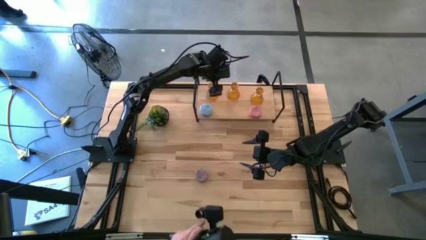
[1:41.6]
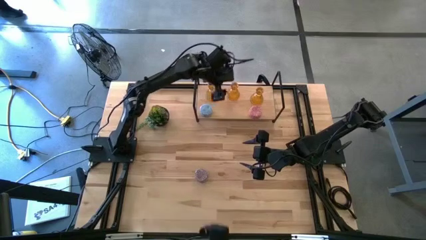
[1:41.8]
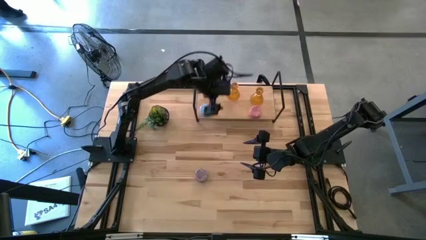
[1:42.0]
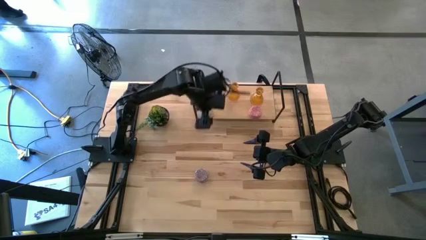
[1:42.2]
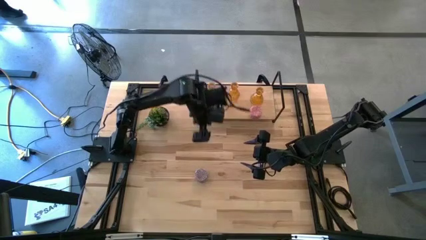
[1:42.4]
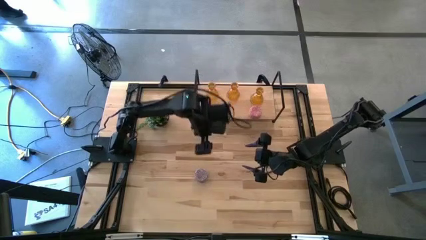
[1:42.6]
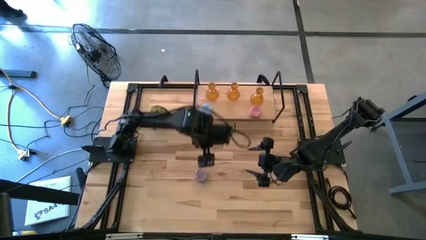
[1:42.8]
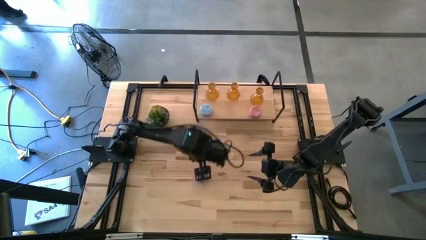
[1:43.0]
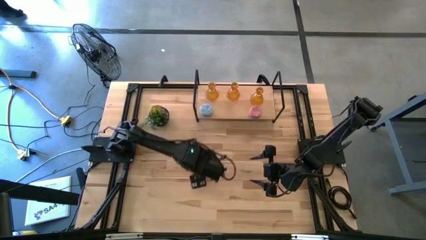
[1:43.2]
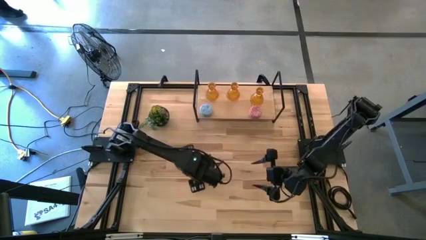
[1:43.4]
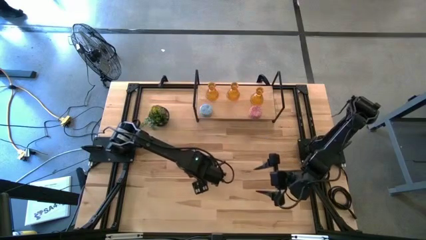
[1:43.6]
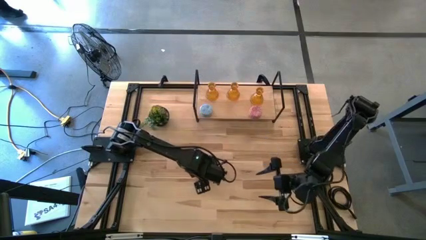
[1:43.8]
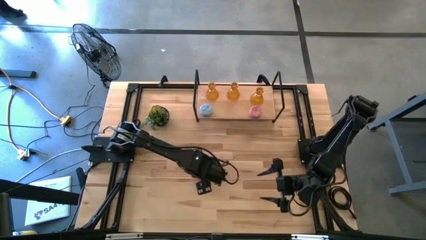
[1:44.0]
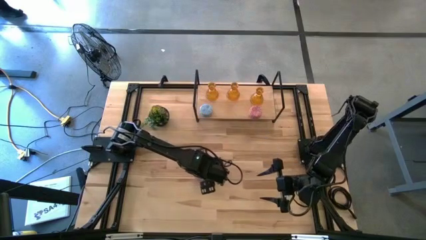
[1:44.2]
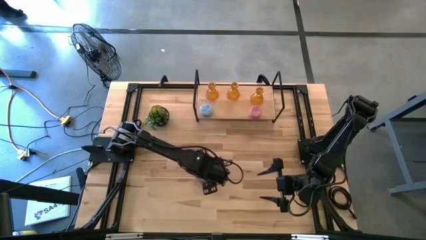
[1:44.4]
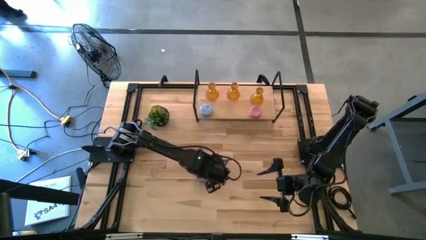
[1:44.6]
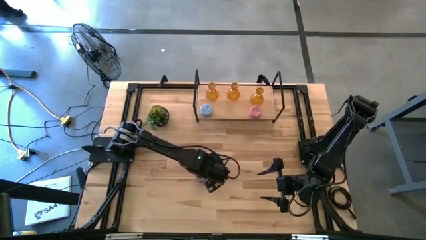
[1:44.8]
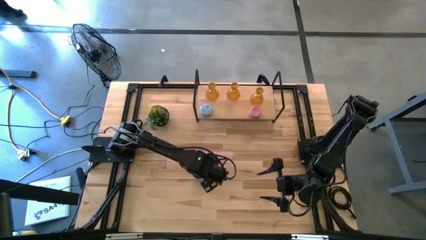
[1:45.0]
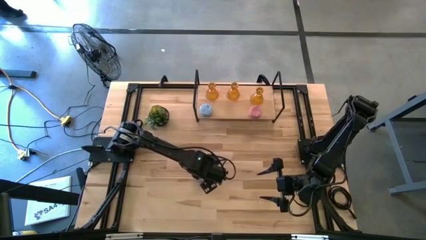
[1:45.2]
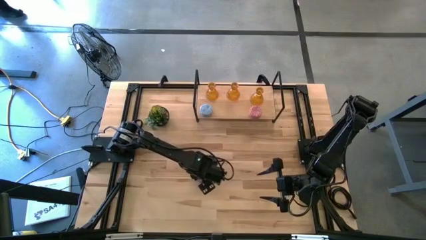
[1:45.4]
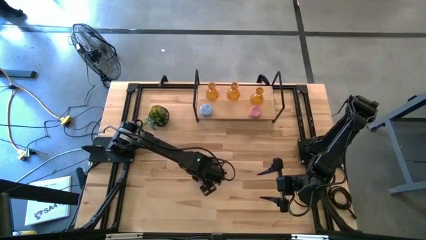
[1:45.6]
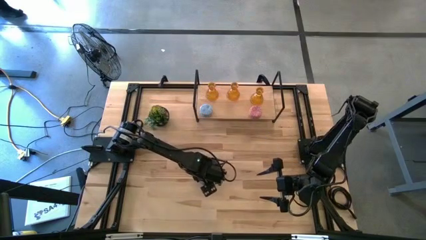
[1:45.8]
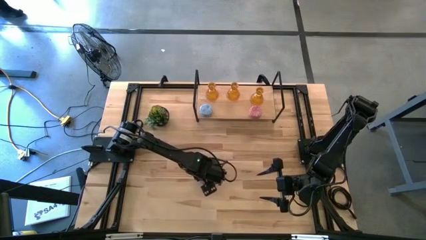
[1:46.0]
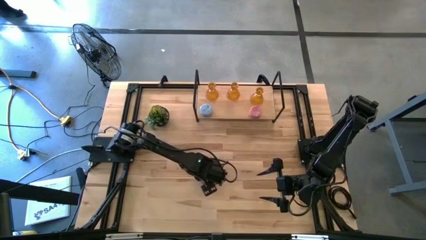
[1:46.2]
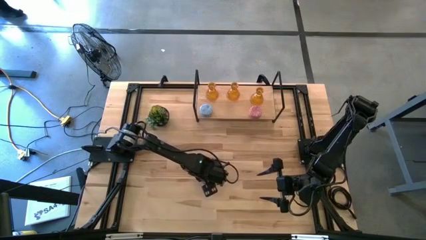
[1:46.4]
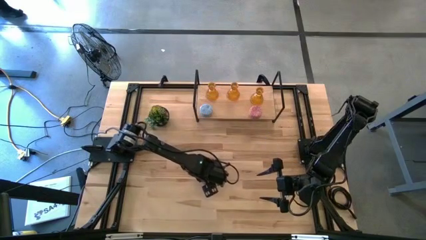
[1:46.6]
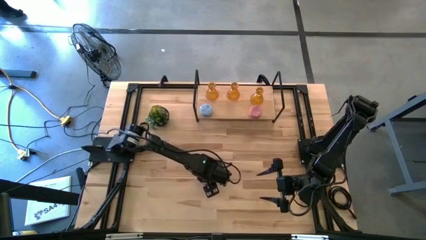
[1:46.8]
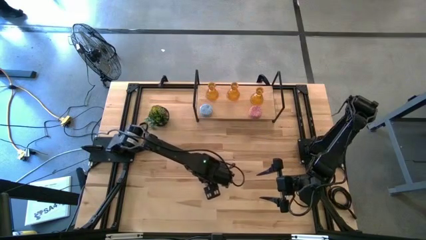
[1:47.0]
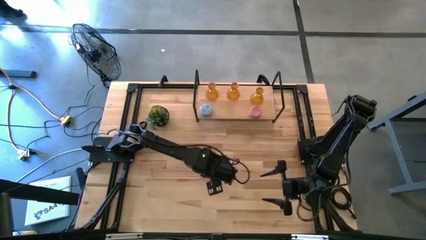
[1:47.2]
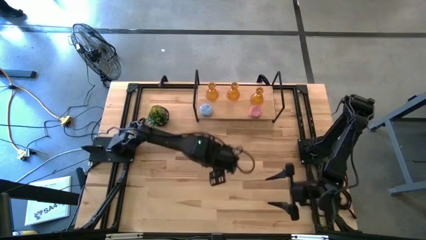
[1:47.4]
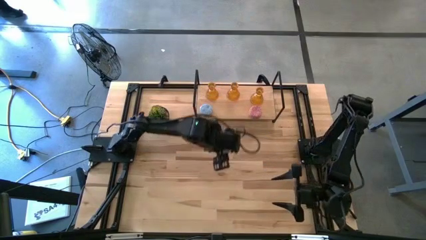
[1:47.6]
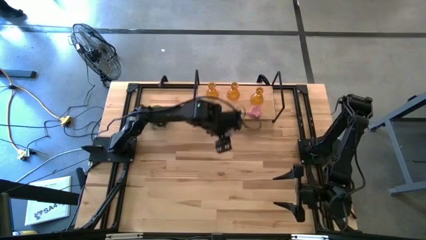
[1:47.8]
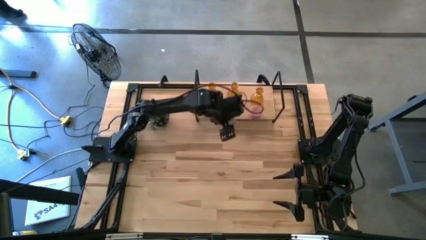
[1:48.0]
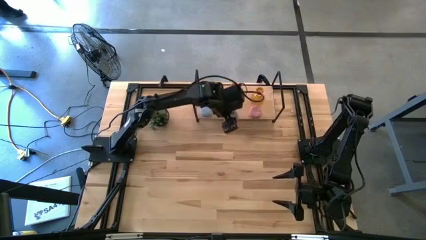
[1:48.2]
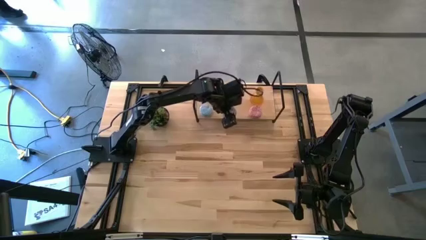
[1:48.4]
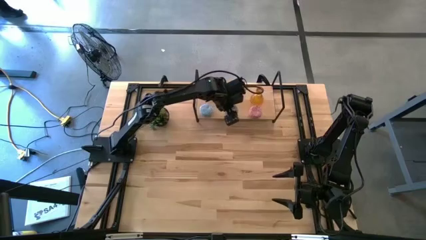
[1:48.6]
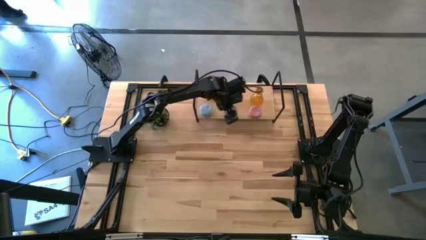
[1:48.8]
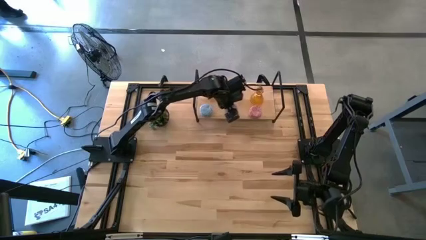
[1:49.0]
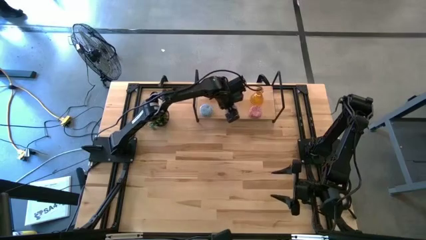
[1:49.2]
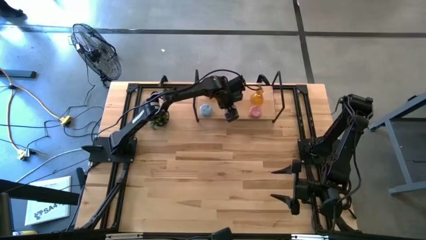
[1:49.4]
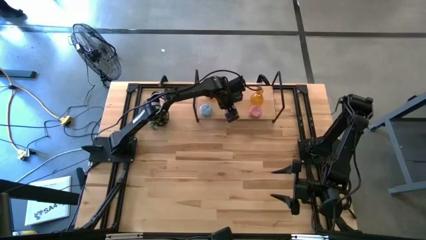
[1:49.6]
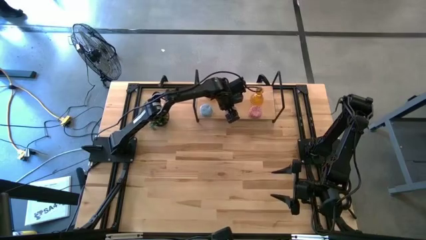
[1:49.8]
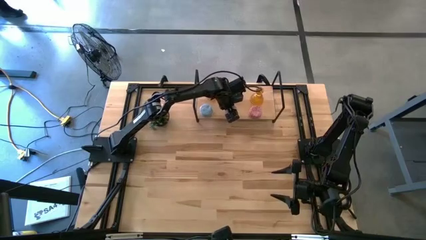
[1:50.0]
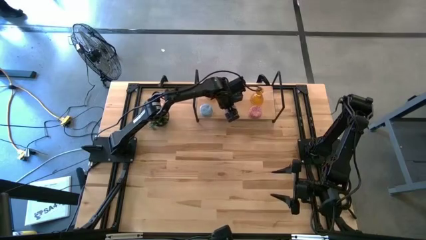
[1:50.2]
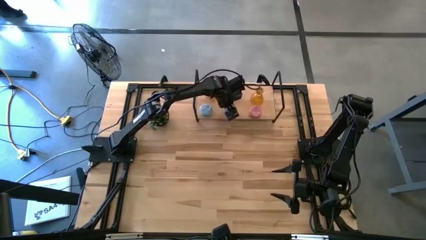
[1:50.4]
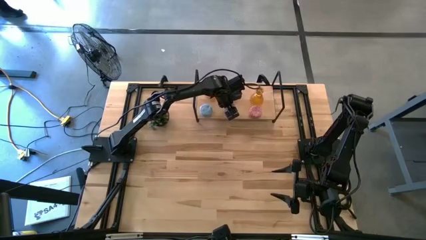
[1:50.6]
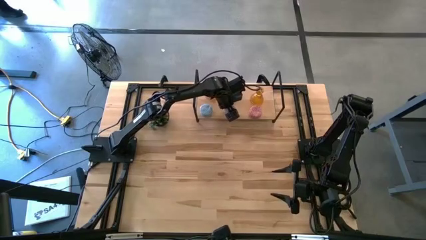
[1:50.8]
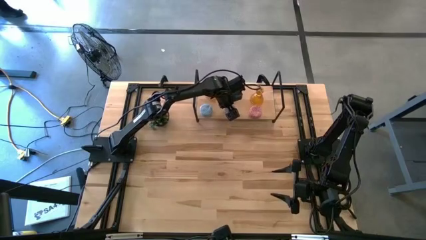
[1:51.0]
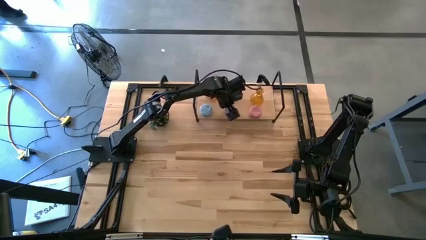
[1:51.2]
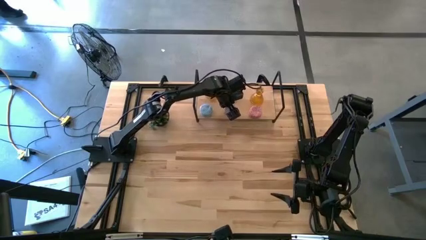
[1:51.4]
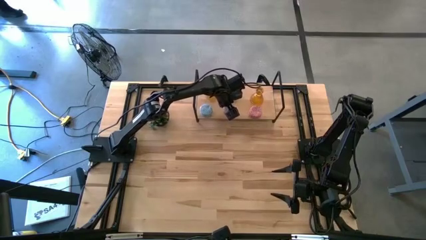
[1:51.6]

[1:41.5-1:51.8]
Task: Pick & Place candle stick holders
Put the red scented candle on the shelf aligned with the blue and pink scented candles

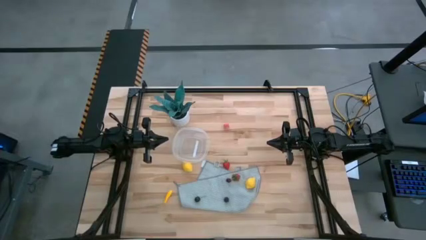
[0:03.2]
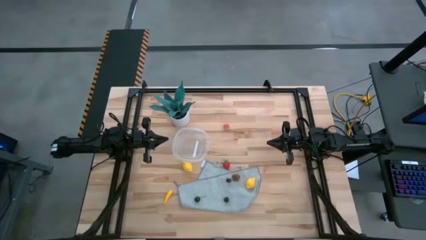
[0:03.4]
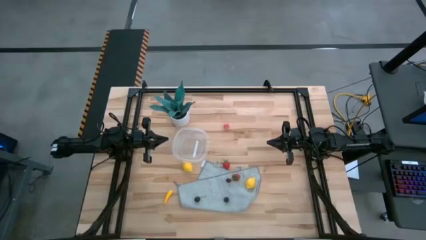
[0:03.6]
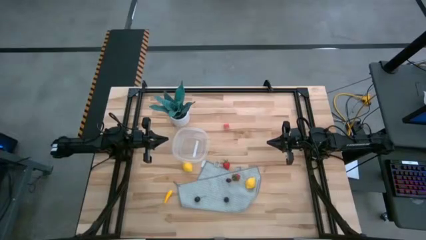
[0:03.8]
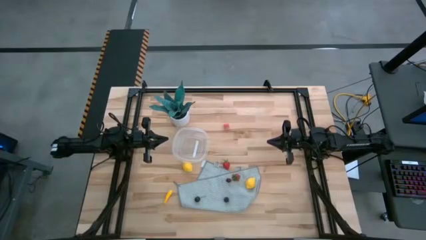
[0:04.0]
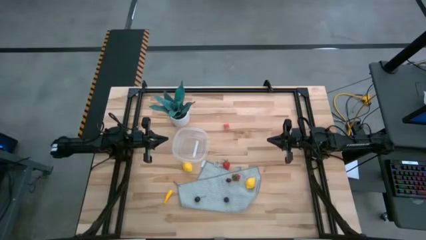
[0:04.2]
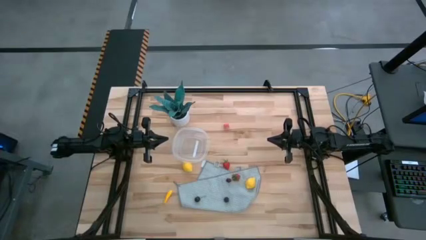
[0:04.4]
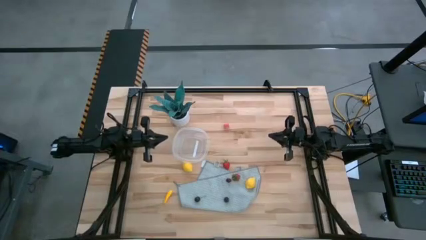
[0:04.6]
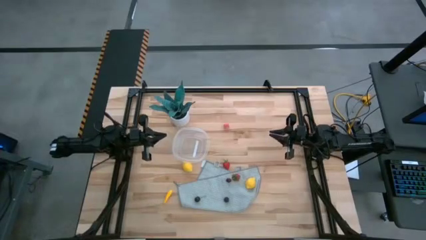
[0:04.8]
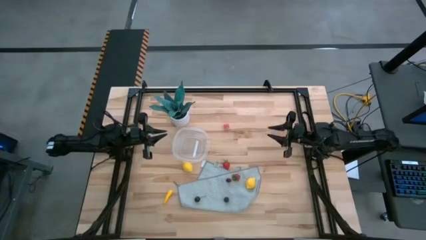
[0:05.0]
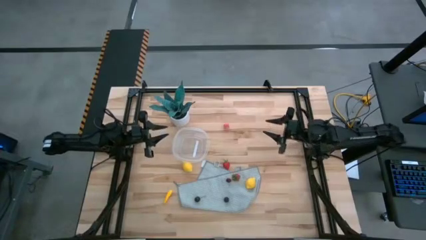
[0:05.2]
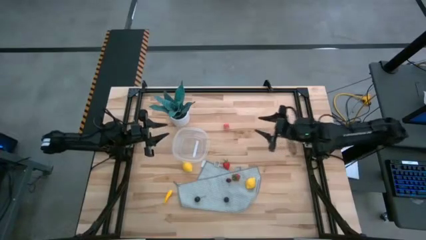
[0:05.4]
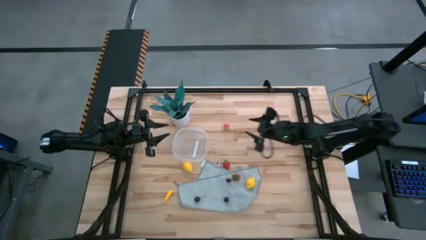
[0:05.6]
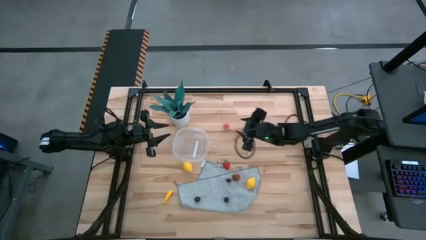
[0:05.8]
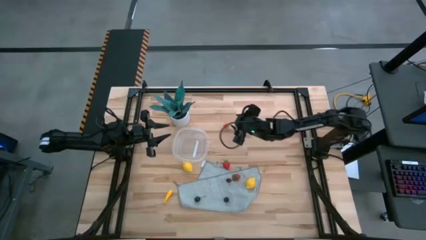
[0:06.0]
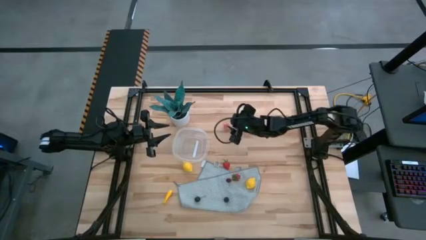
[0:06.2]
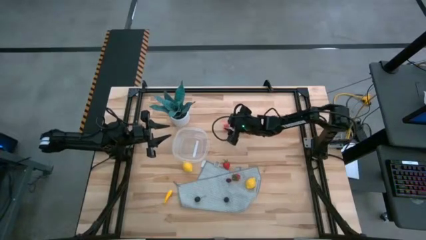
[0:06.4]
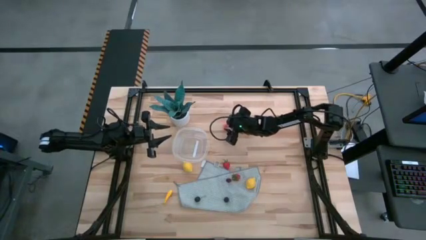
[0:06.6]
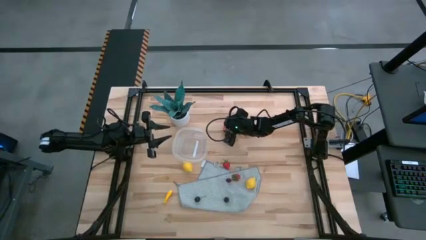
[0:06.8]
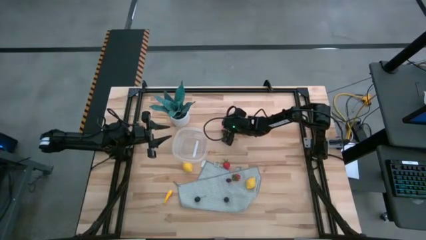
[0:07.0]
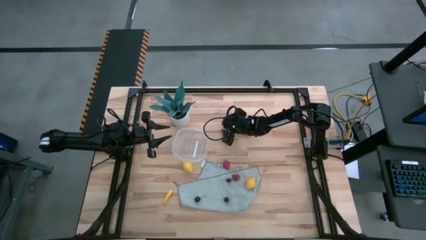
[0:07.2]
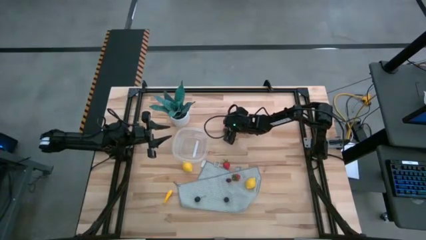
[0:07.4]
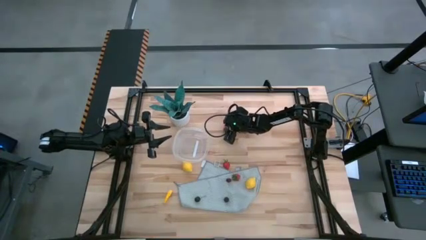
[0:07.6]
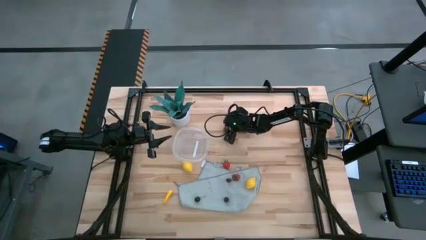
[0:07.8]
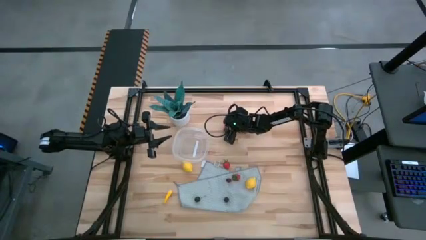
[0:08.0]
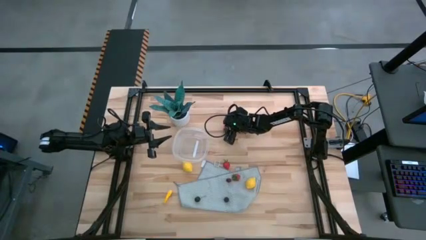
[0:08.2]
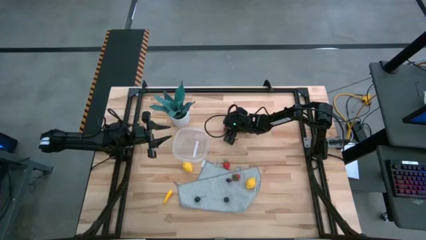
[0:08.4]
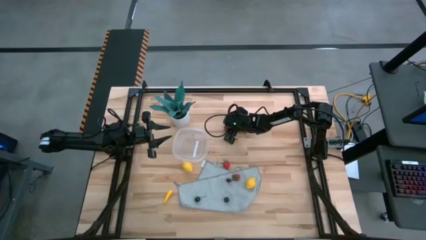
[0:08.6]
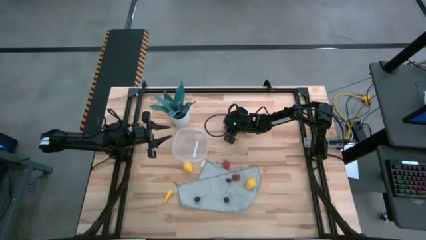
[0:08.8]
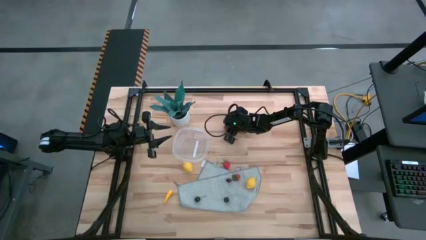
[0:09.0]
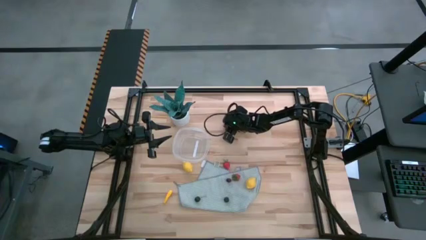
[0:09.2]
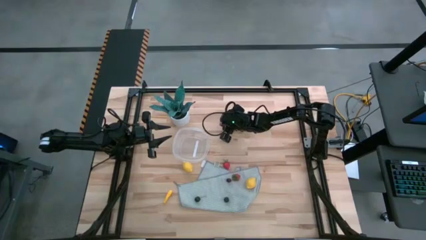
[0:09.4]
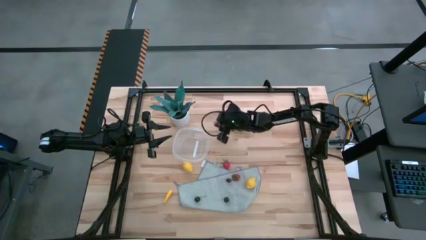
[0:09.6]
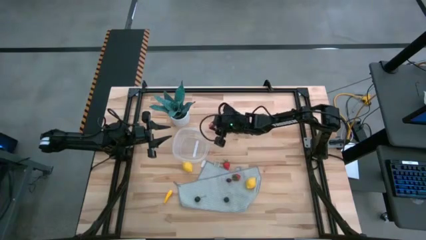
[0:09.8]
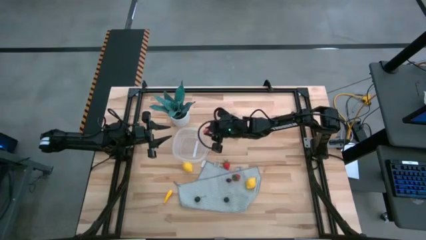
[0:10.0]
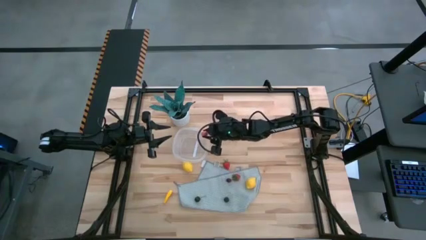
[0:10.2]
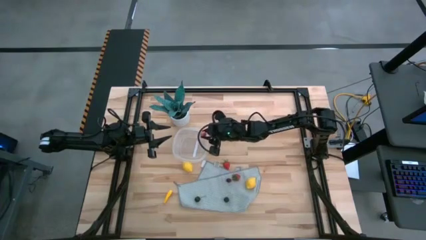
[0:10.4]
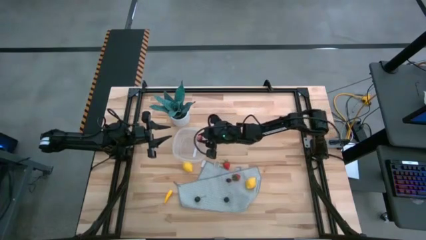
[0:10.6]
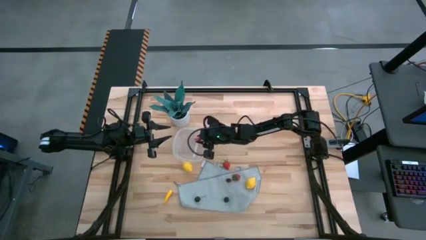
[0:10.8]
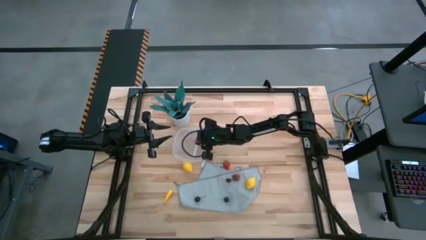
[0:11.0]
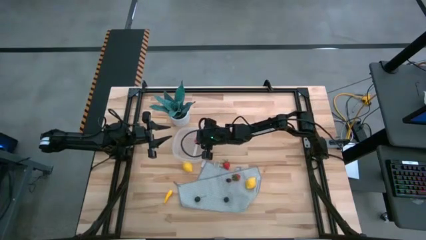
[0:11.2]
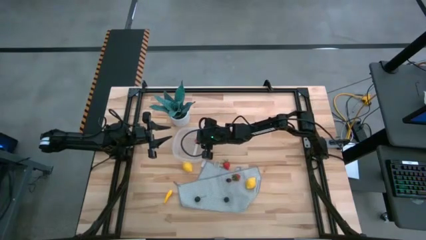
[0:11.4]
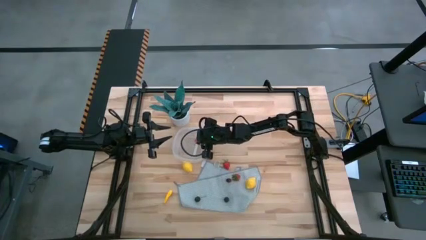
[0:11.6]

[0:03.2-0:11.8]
Task: Pick and placing Produce into tupperware
Put the pink peach into the container
